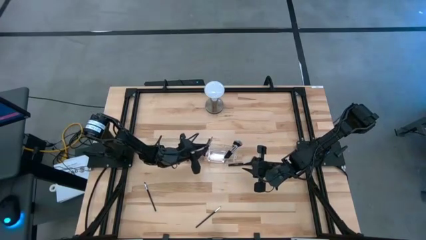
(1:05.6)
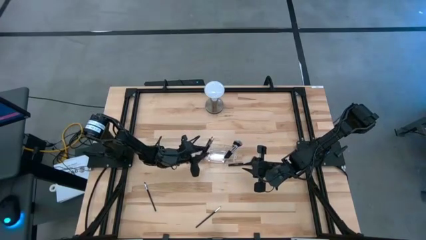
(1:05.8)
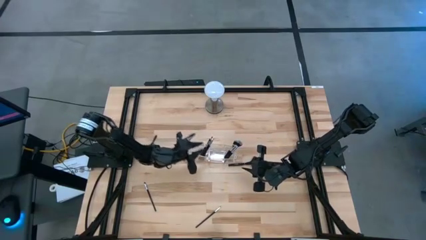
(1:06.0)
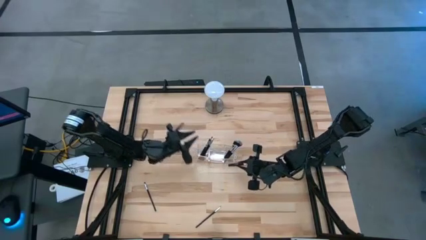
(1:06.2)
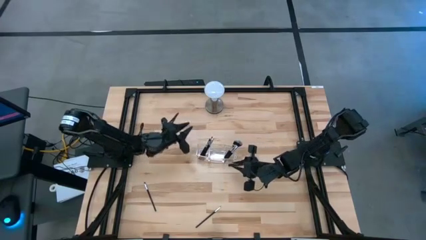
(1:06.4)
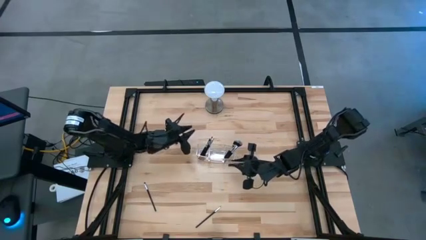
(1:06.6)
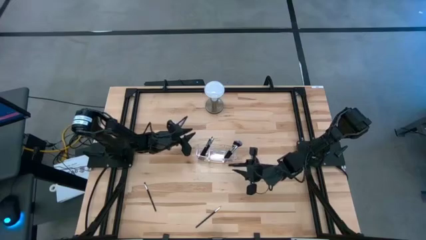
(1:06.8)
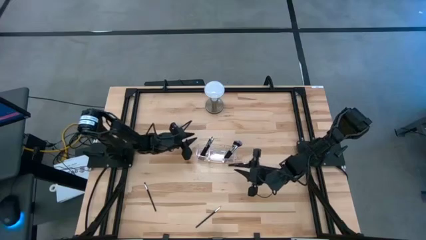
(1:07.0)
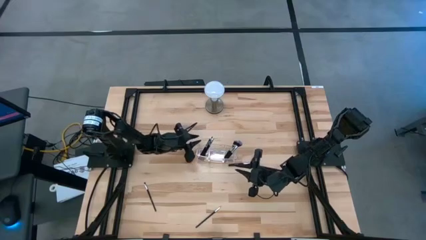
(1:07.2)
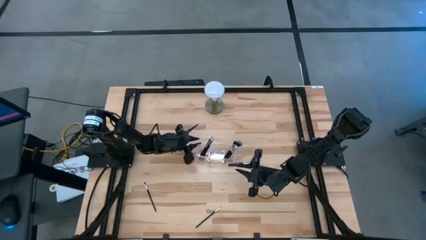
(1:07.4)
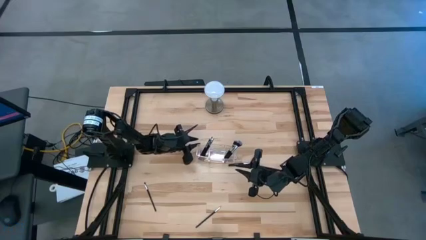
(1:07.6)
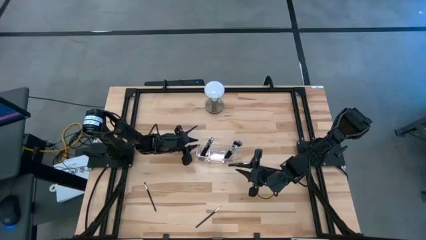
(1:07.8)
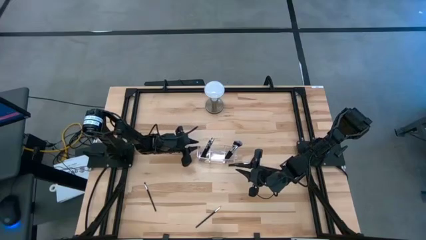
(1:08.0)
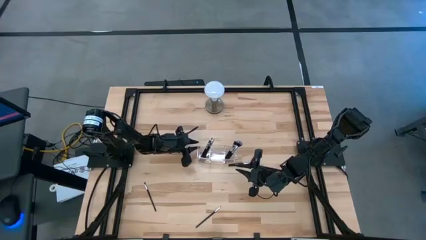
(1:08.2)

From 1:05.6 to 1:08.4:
Task: Put items in baskets/containers
Adjust the transparent organizer

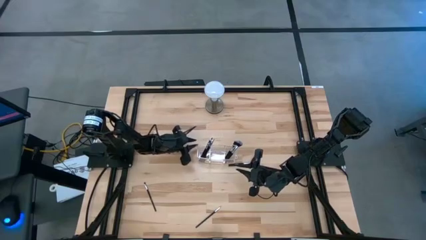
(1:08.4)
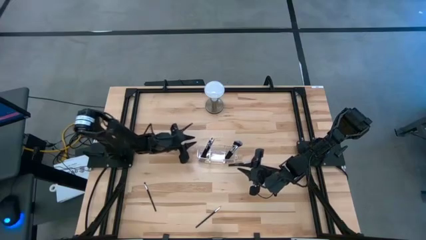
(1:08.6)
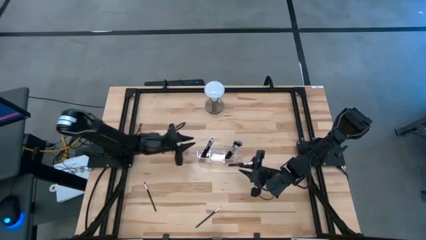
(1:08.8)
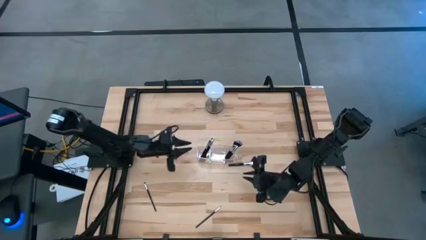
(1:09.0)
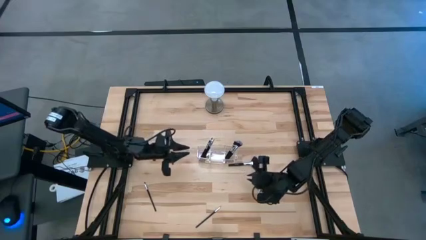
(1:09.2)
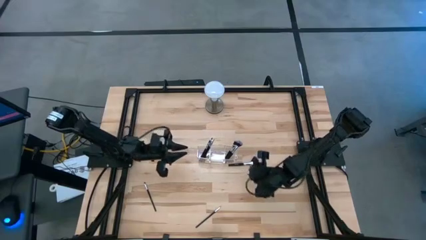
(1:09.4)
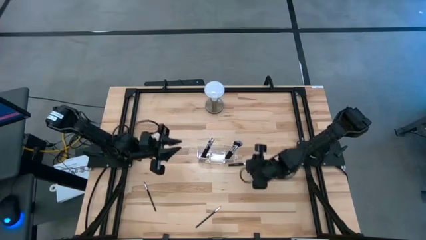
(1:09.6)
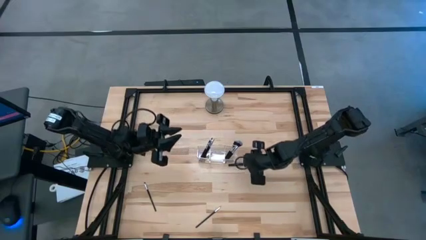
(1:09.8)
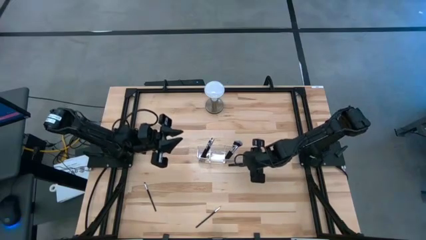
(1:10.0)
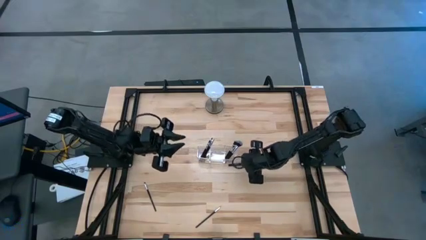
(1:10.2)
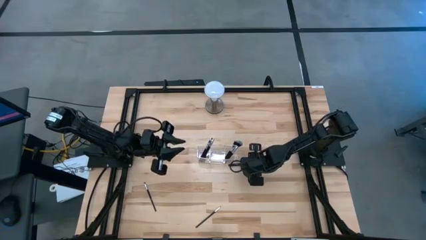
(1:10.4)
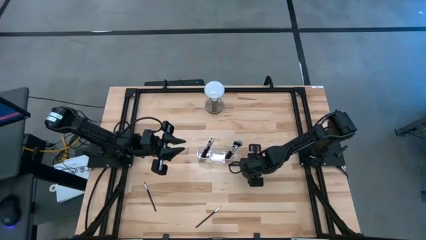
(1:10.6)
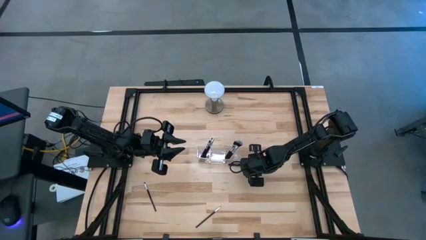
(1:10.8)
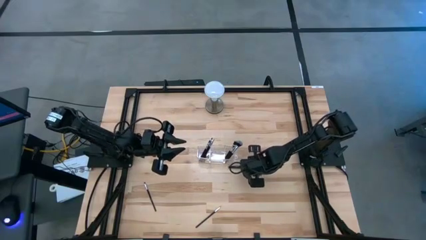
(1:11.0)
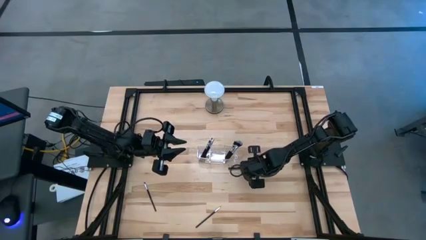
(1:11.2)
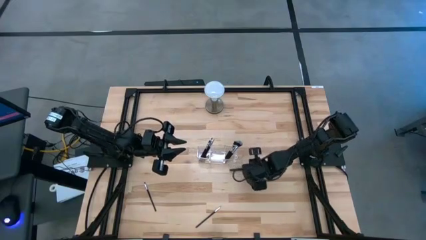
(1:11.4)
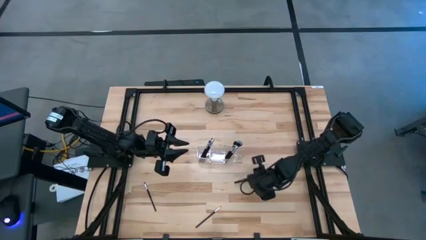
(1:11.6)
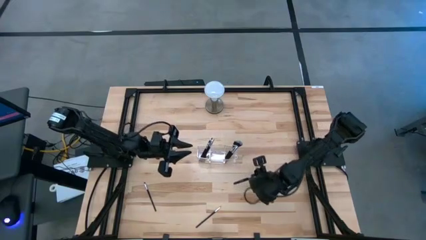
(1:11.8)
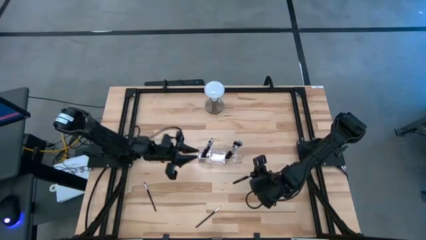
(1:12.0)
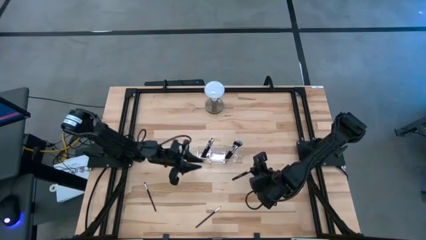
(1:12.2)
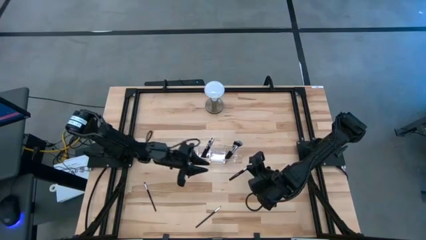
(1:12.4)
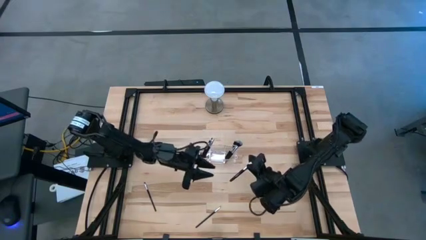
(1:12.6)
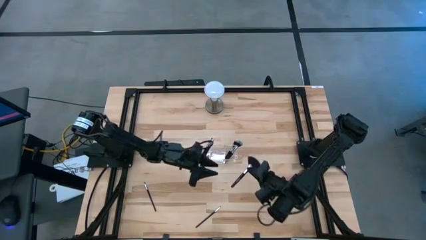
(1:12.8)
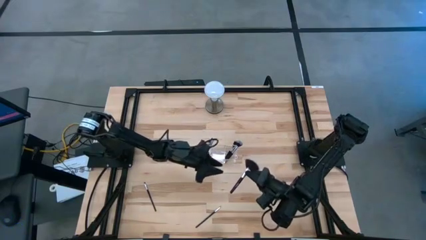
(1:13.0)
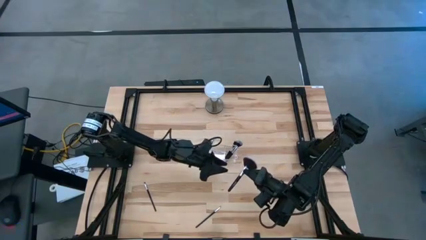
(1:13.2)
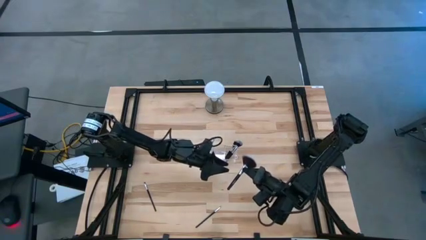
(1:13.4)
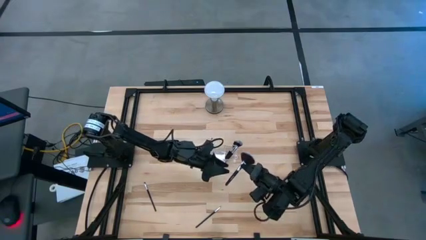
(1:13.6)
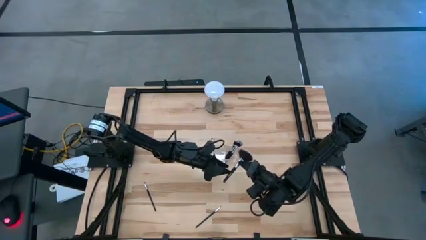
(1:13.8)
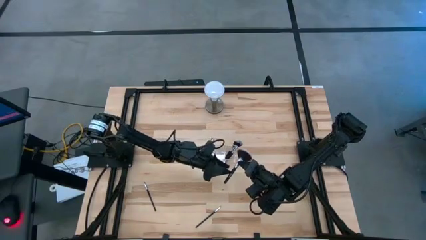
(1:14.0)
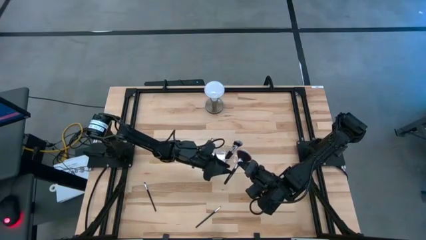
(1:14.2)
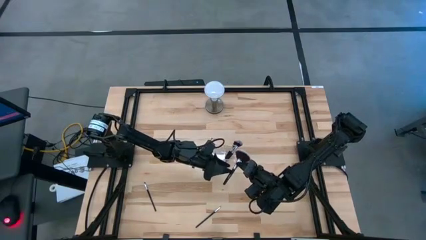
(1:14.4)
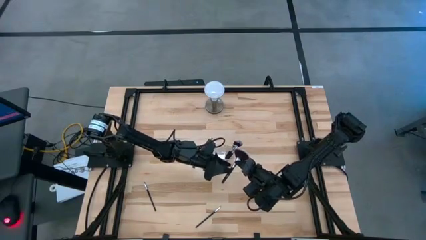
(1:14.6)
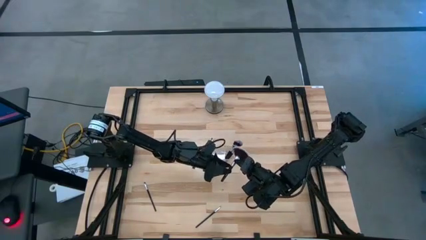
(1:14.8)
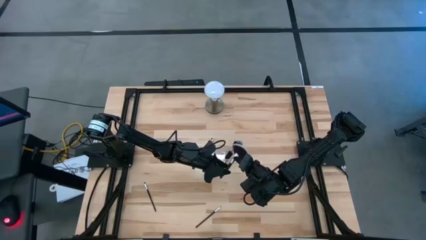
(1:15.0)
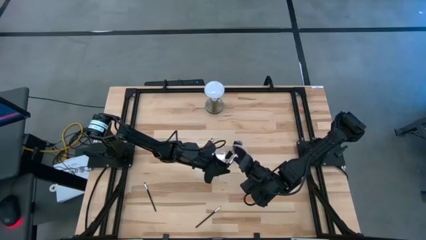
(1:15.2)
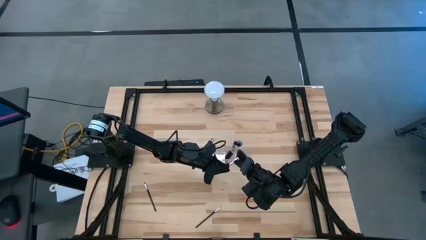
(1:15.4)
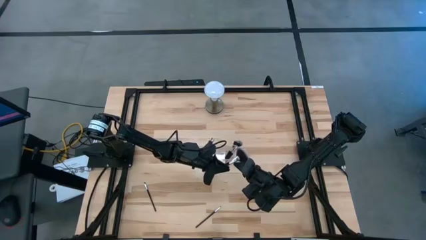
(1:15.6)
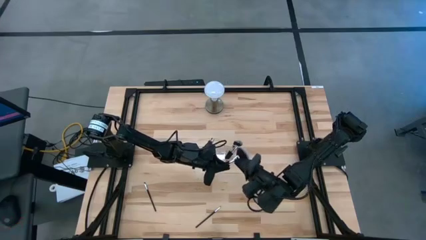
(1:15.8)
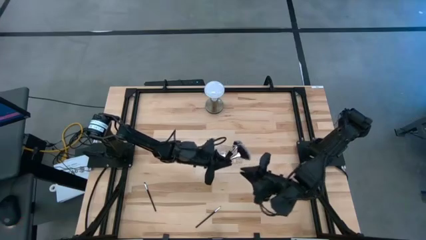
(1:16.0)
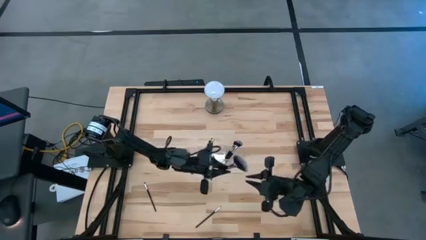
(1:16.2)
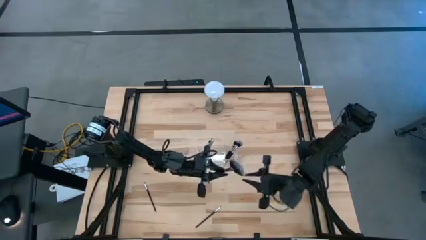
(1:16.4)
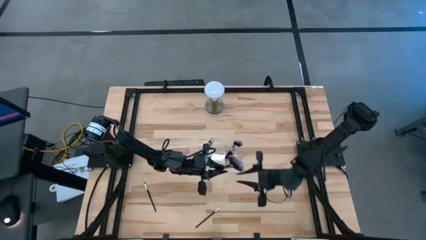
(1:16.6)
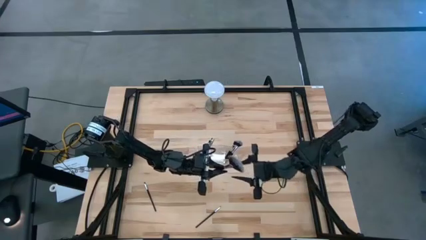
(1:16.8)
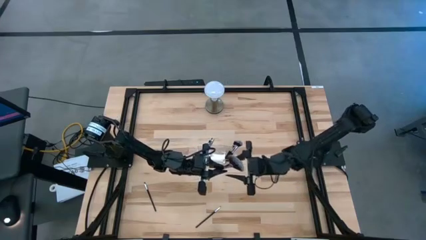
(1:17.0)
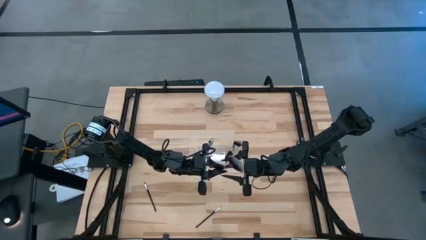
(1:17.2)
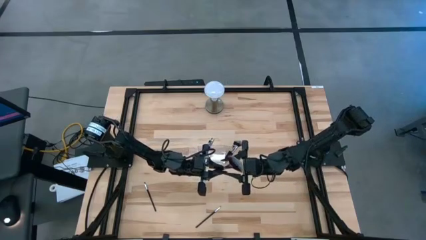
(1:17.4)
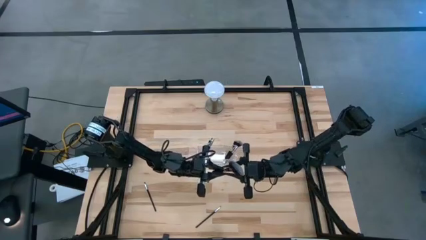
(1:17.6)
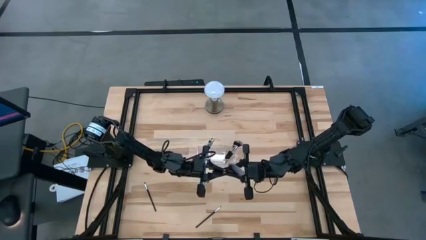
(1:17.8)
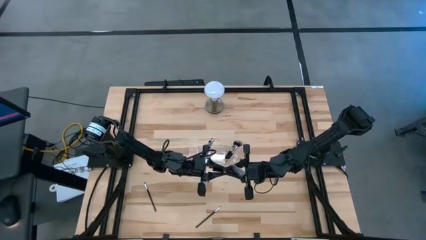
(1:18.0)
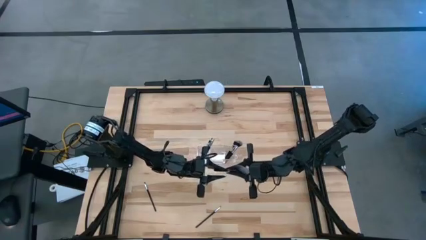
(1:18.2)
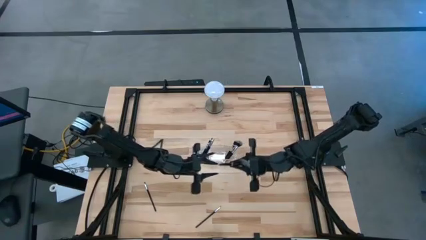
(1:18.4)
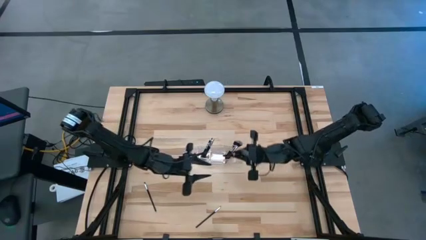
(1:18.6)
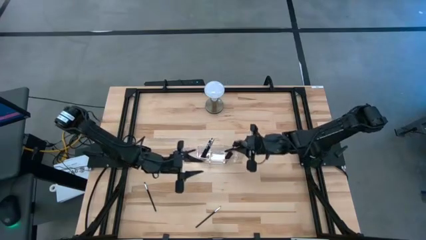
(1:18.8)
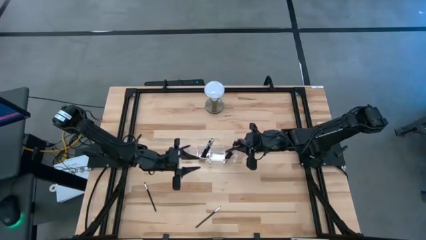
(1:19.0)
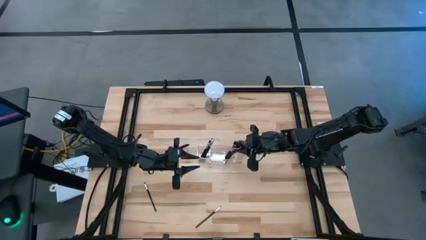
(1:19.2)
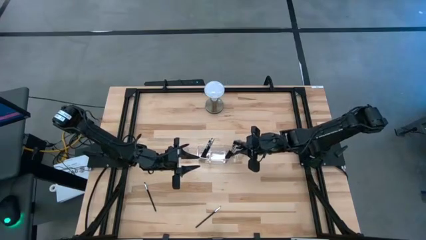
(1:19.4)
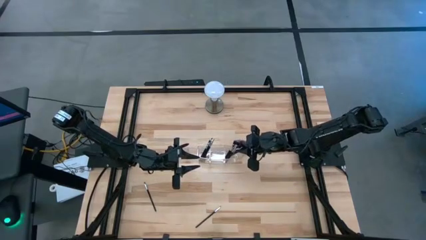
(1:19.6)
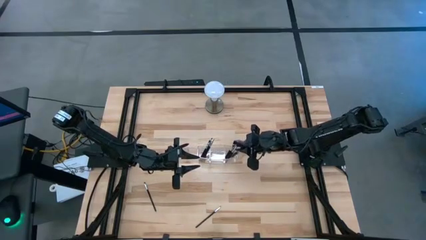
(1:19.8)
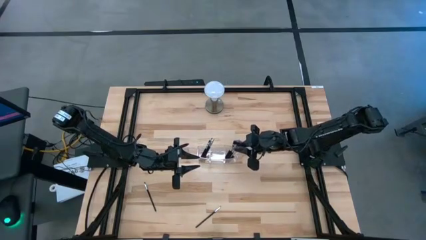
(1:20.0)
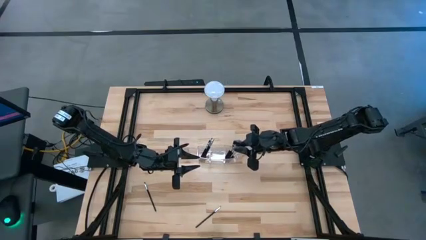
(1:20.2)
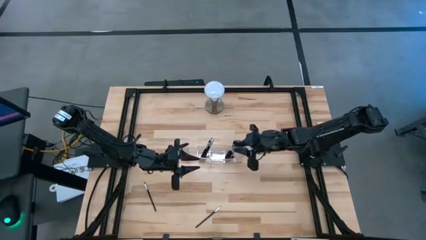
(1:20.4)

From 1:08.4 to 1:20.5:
Put the black highlighter brush into the transparent organizer

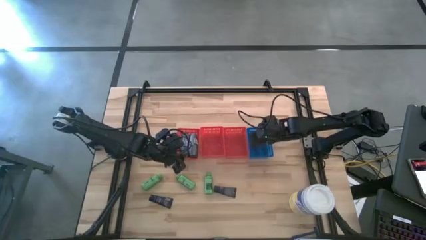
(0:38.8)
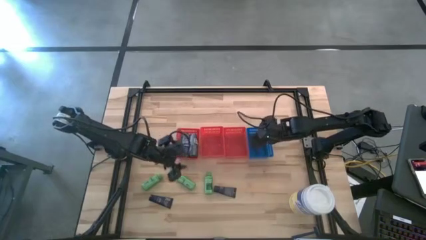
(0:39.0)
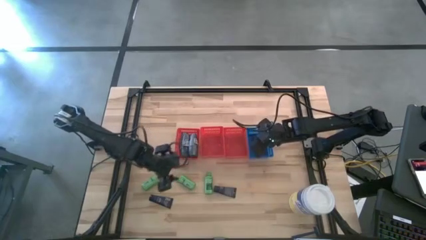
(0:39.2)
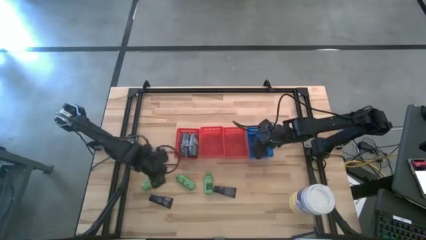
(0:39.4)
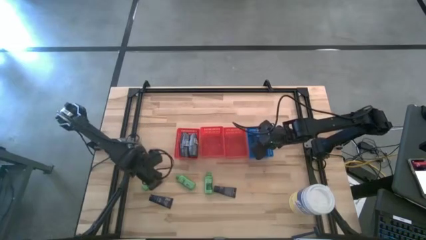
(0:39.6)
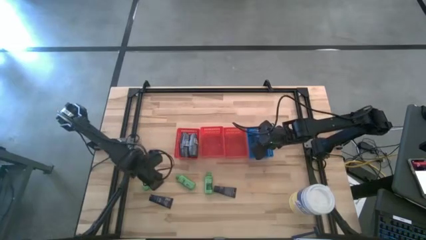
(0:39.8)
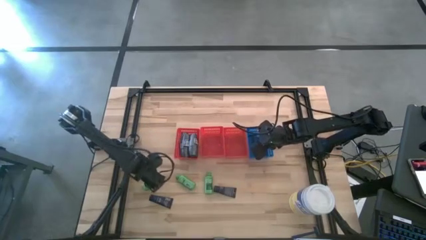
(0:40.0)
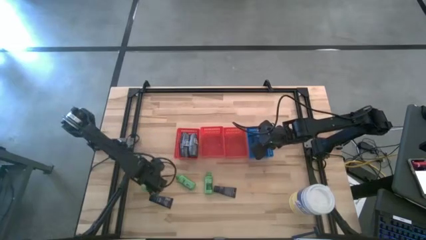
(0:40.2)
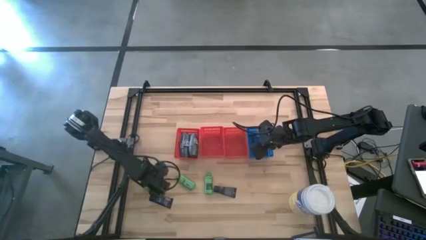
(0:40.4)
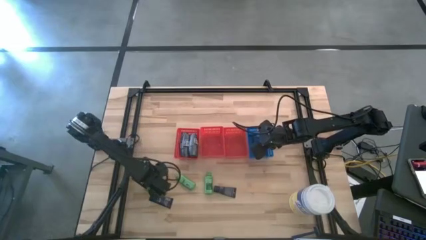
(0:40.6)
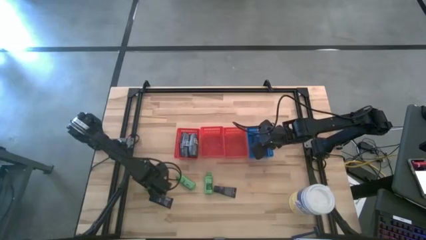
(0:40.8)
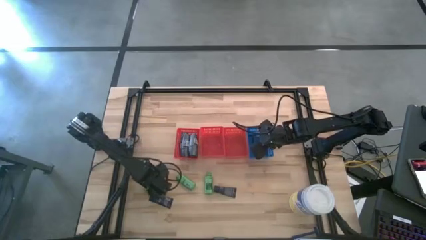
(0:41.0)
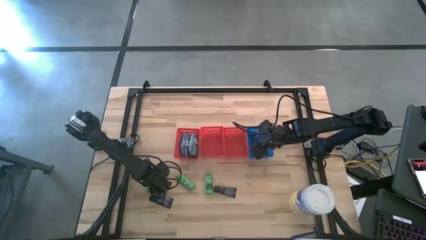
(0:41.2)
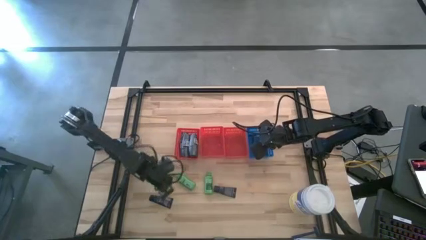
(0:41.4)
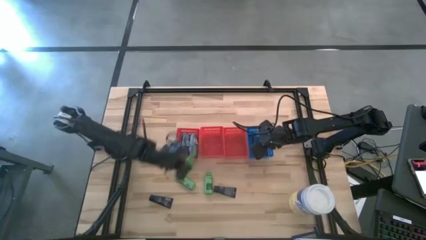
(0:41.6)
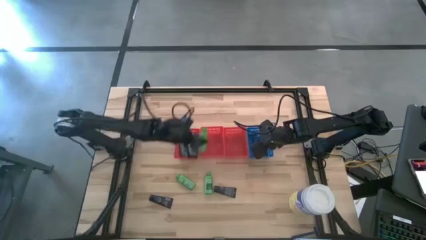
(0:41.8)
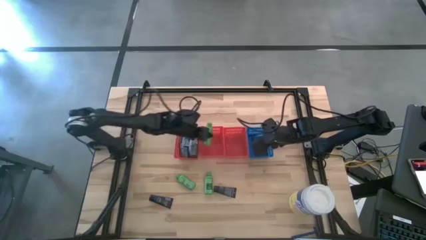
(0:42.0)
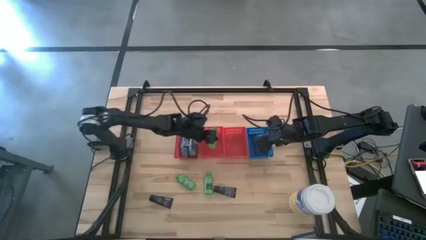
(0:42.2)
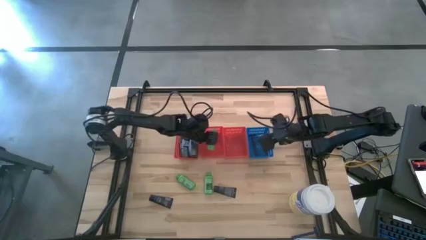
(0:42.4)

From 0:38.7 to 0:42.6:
Task: Pick & Place Travel size toiletries
Put the green shampoo bottle into the middle red bin
